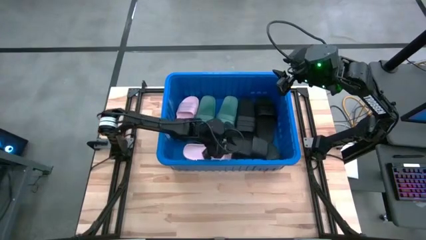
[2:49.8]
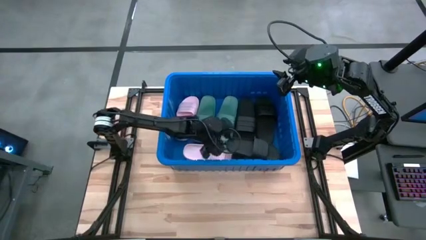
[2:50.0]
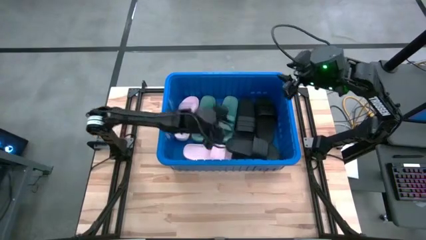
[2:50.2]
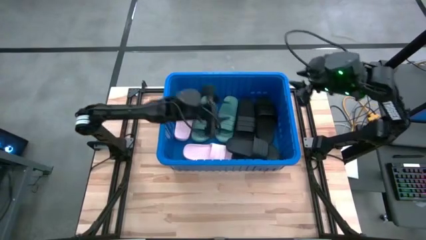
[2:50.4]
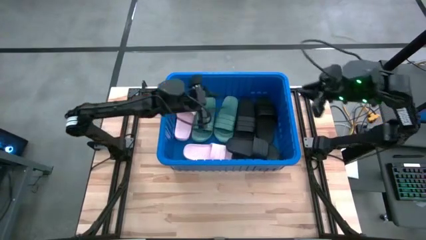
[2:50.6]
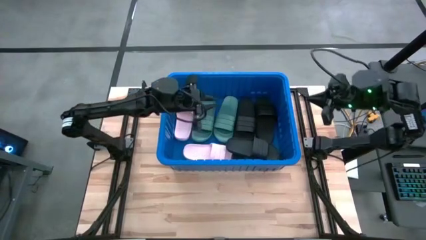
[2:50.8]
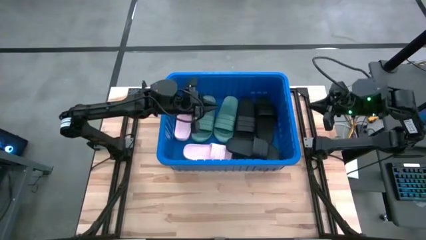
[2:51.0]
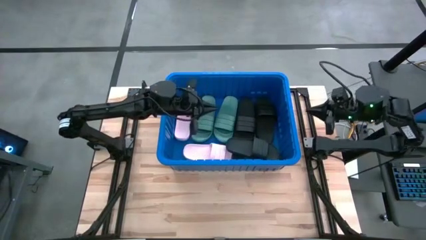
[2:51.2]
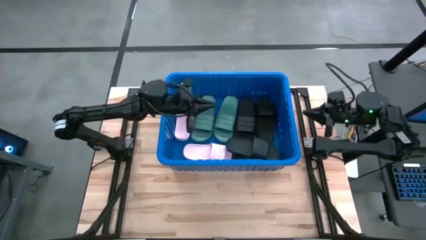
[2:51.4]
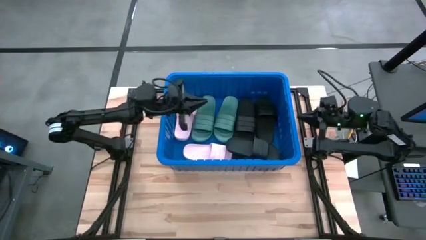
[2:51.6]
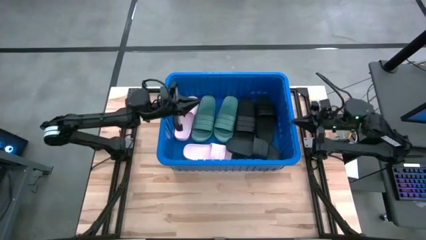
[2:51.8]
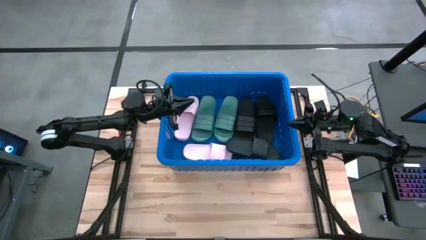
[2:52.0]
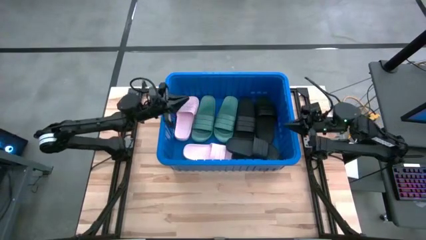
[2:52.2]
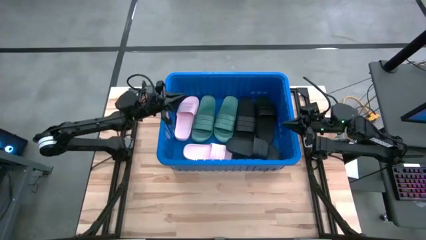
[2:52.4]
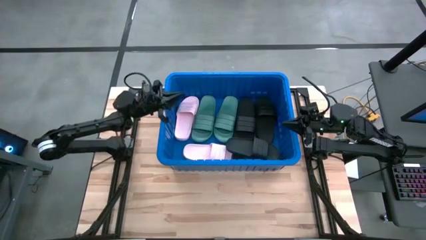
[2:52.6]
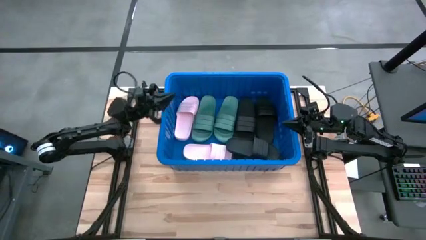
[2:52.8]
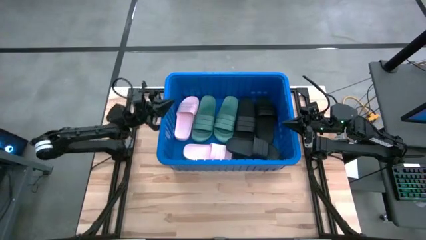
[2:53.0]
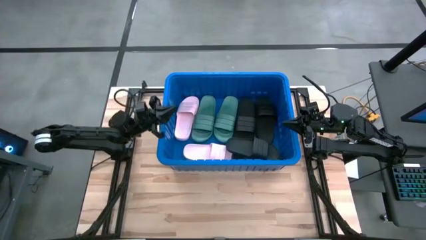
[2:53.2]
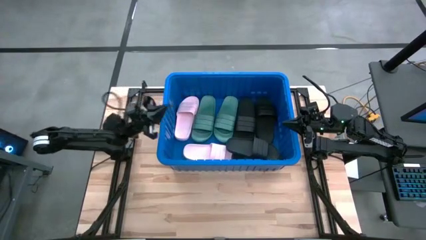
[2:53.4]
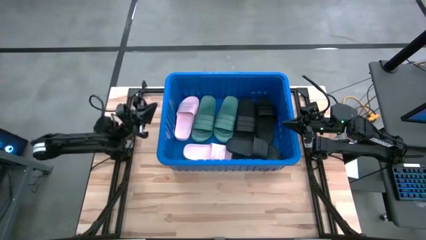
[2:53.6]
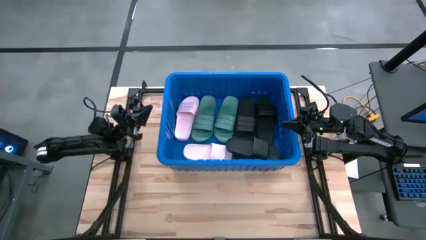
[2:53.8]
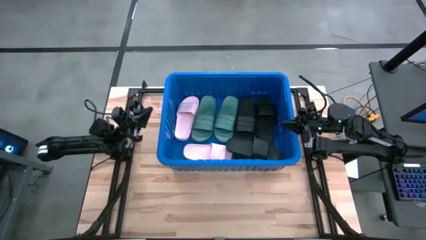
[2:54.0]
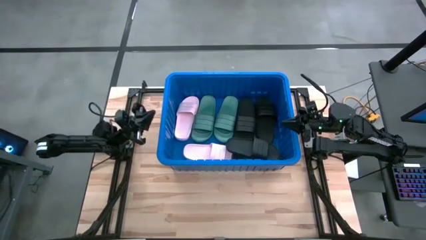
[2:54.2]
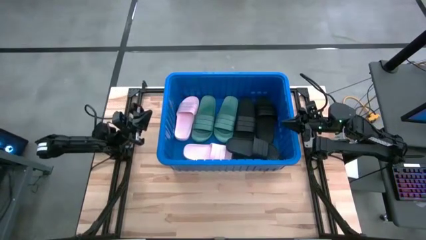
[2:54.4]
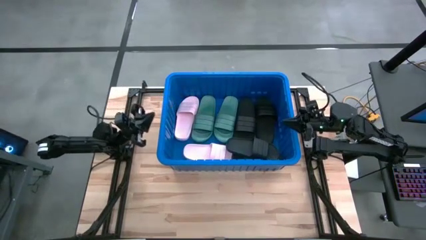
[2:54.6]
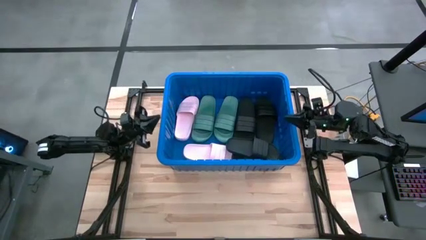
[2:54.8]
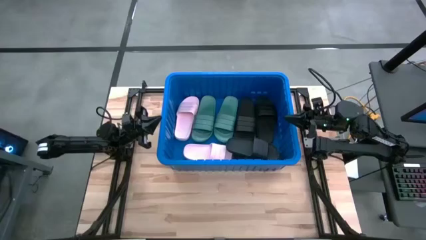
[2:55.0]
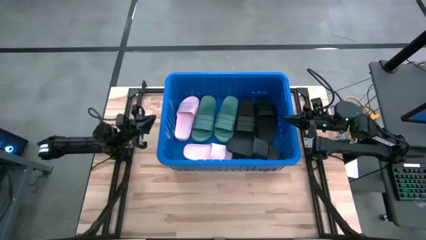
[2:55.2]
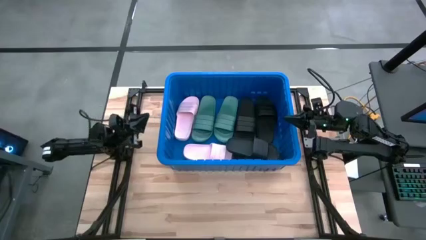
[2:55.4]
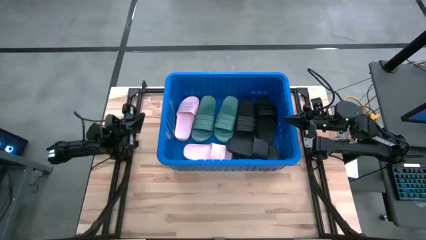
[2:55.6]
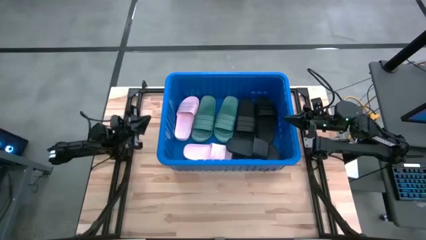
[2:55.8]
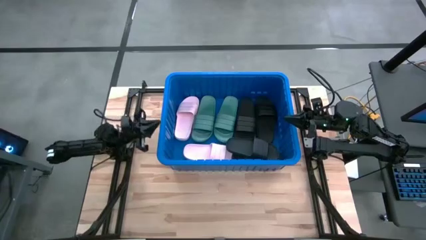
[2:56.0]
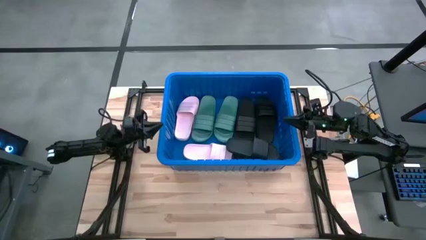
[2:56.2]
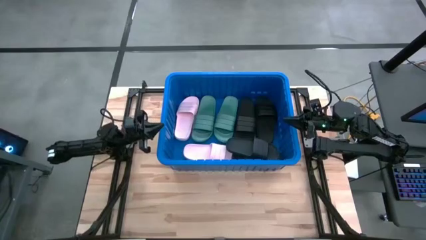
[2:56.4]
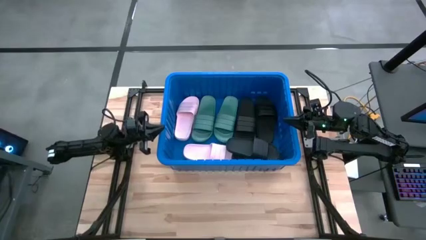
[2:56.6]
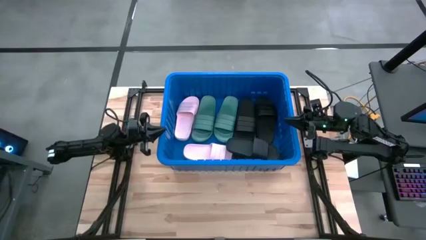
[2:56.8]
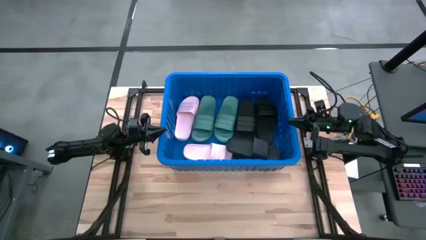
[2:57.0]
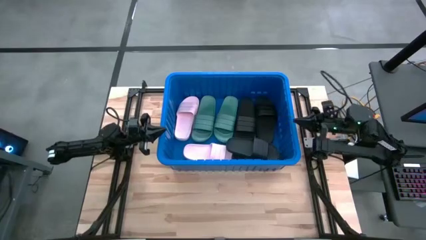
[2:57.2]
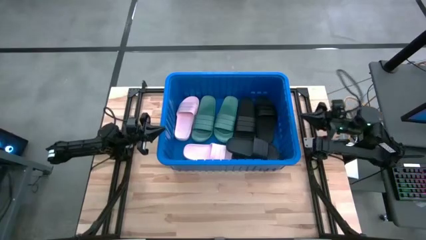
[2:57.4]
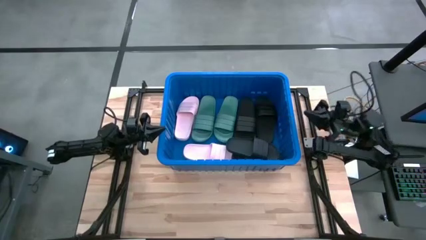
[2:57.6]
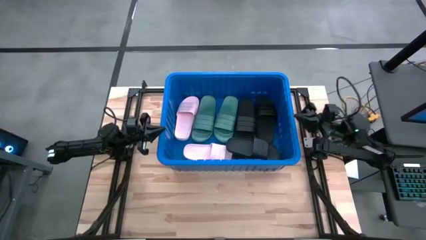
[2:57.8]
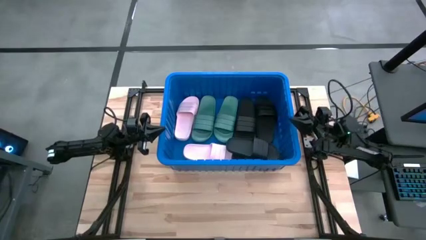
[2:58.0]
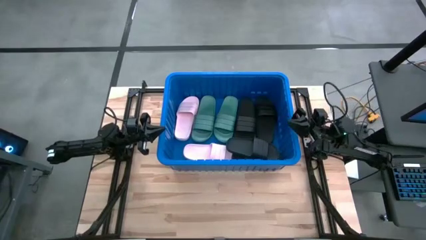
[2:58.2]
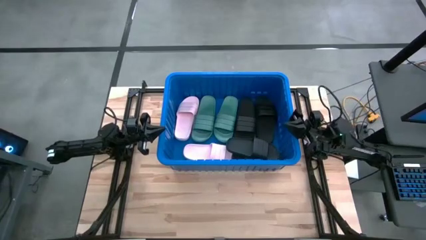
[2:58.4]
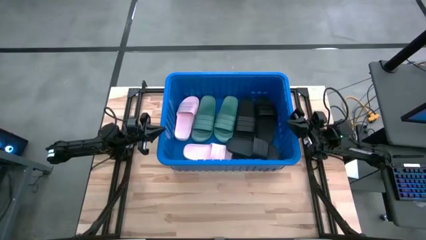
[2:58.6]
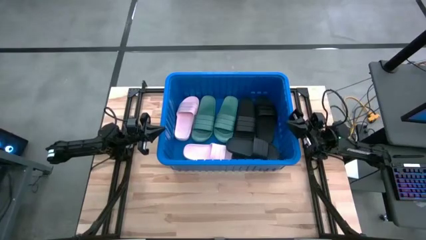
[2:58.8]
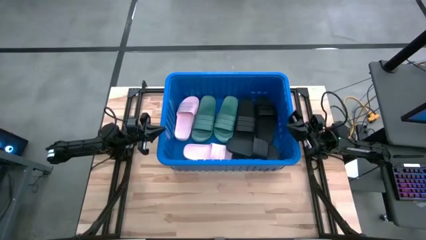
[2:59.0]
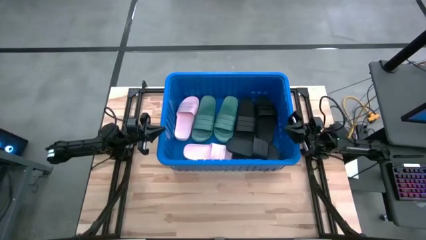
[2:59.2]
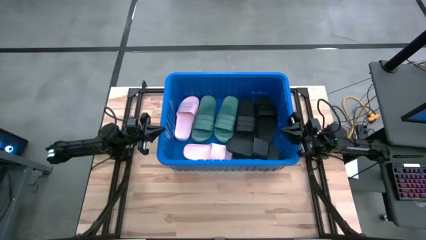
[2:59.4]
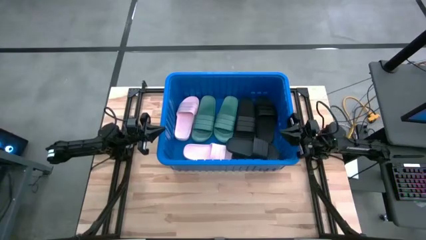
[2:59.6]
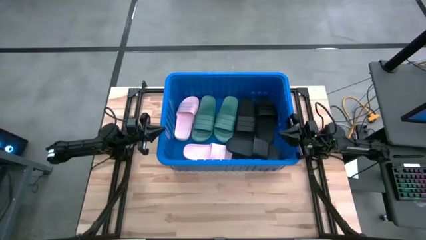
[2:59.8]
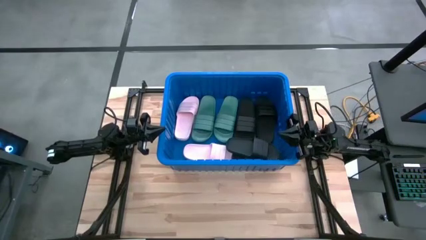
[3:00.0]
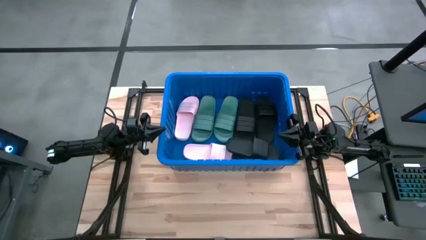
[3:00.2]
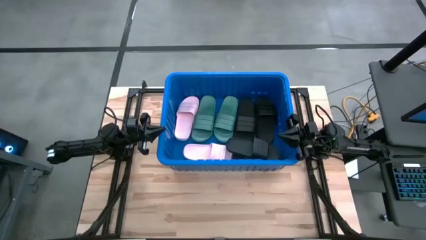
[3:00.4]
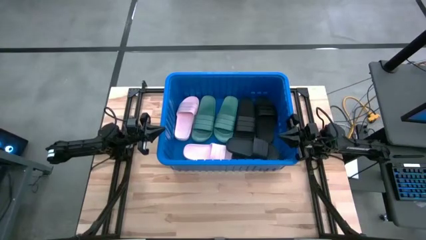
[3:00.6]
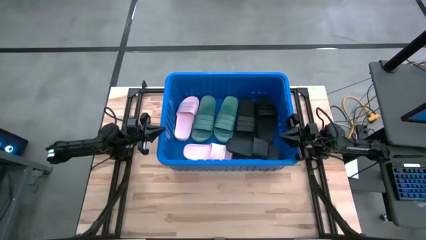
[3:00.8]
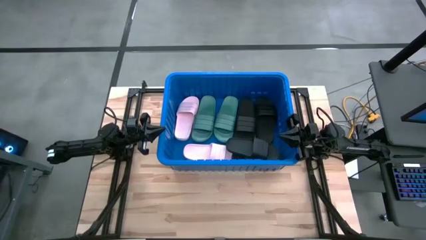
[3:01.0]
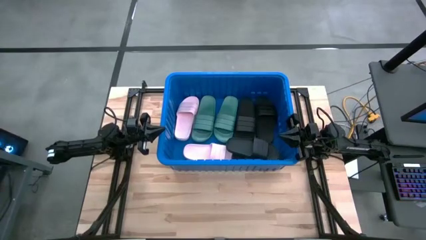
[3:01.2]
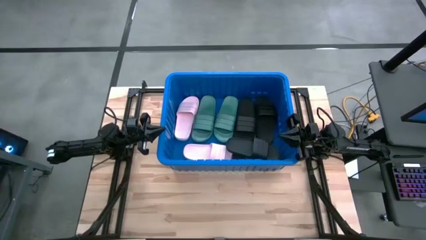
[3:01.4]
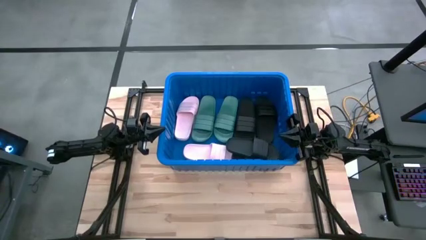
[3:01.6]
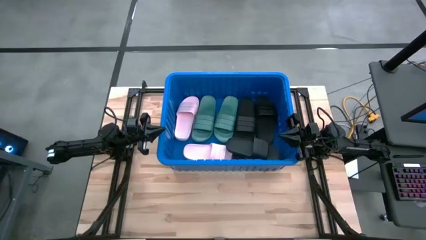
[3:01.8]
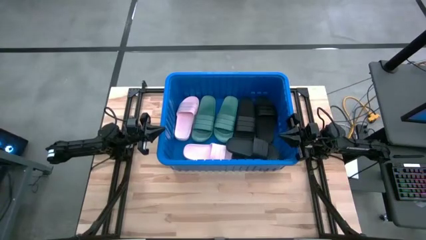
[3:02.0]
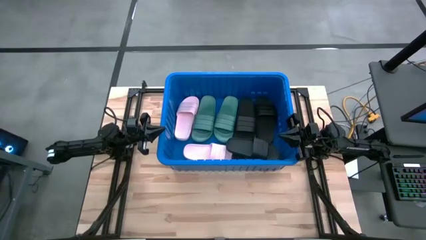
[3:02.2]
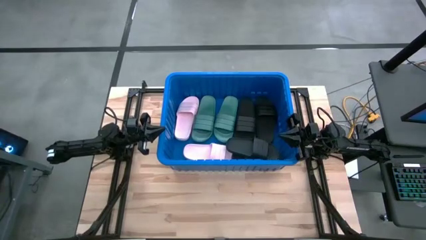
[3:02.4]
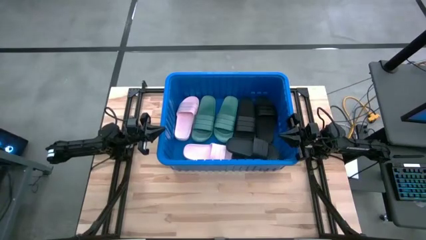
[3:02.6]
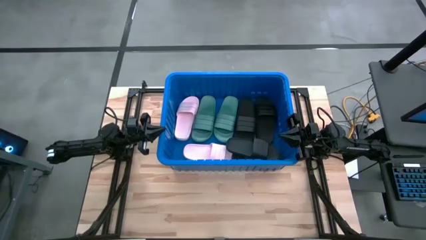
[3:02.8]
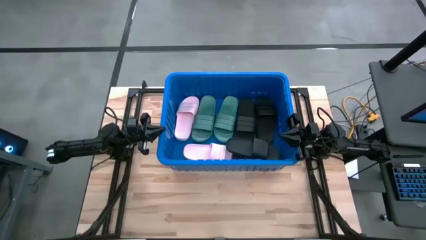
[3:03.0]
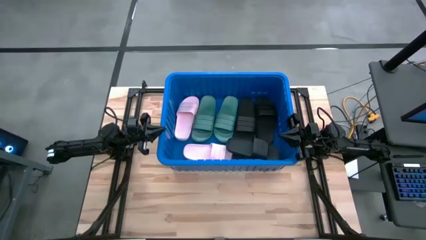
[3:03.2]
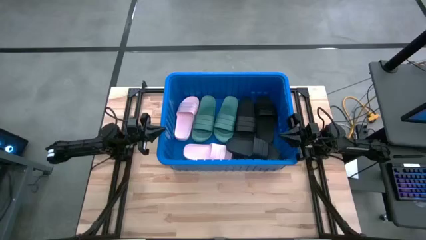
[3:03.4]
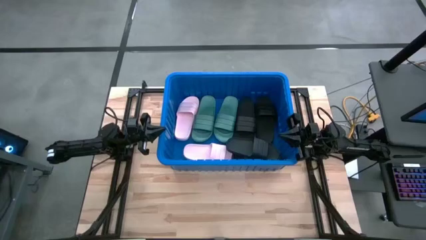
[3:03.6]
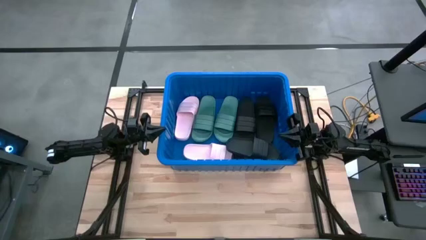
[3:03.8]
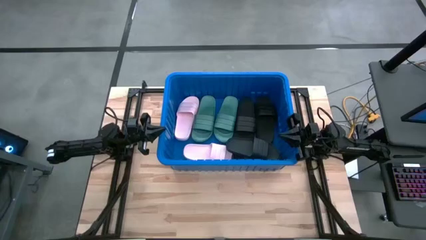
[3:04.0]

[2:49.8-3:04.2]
Task: Pick and place slides into bin
Return to Home Position
